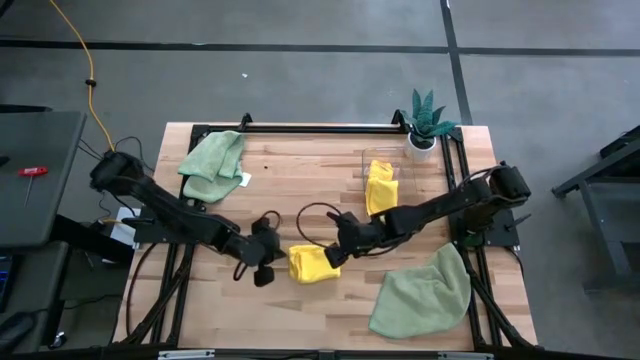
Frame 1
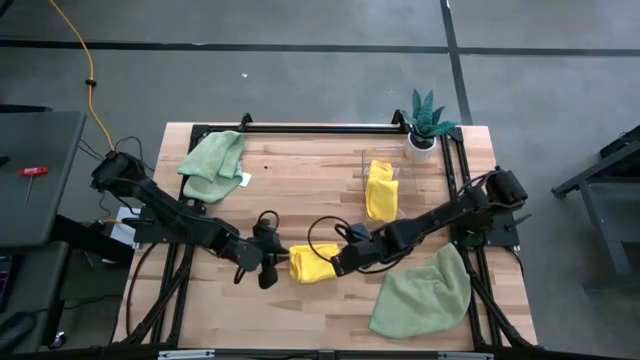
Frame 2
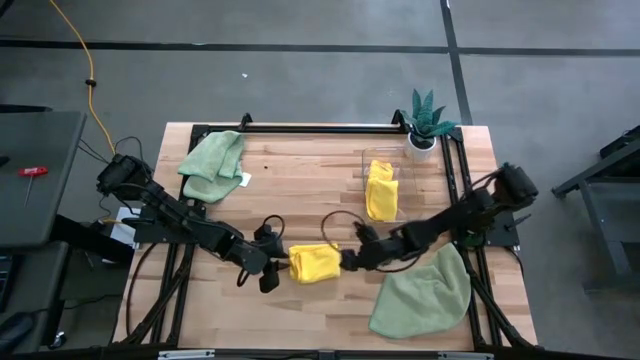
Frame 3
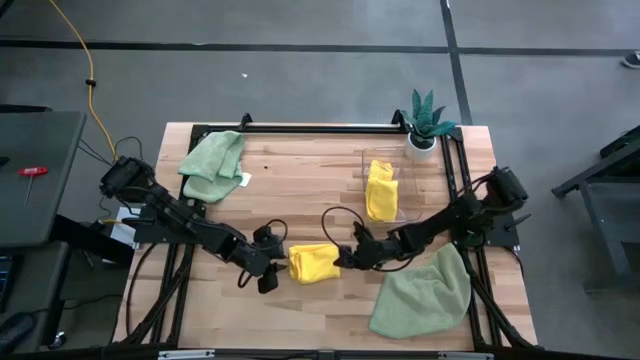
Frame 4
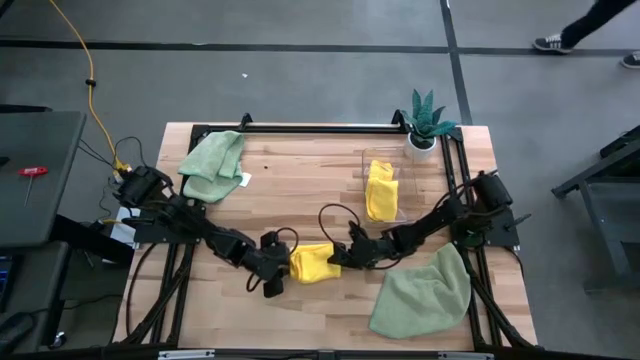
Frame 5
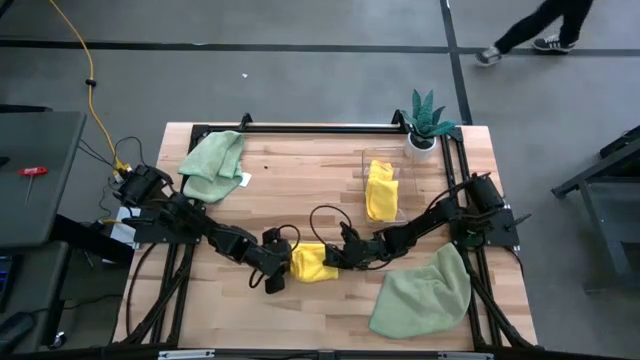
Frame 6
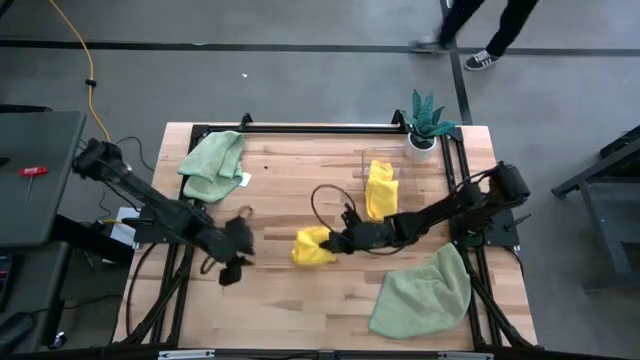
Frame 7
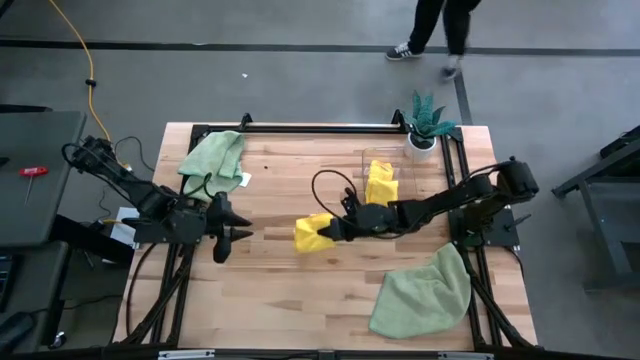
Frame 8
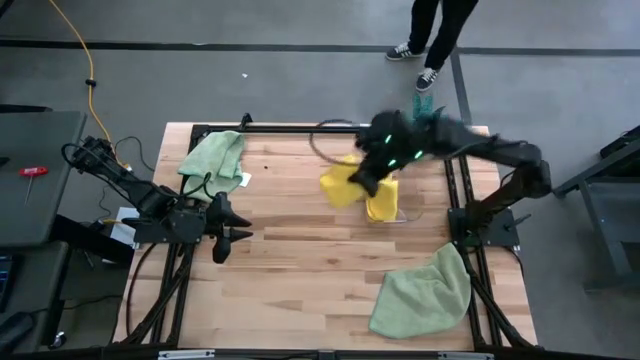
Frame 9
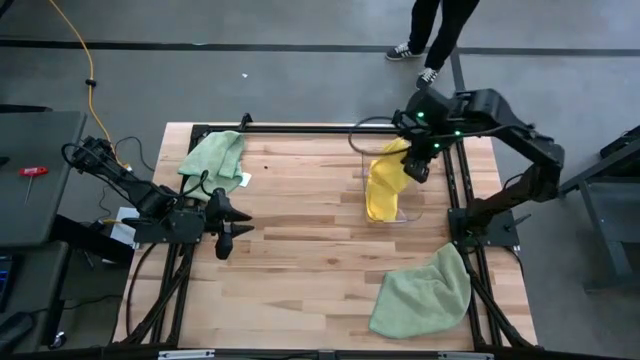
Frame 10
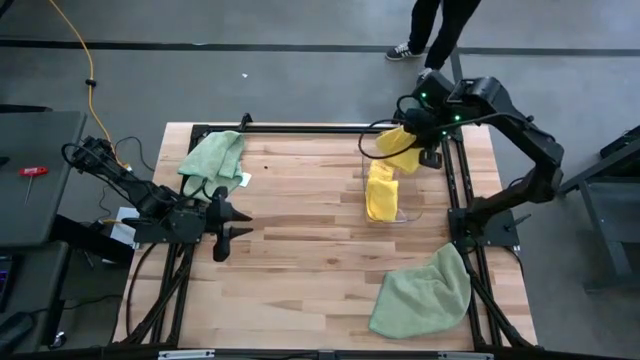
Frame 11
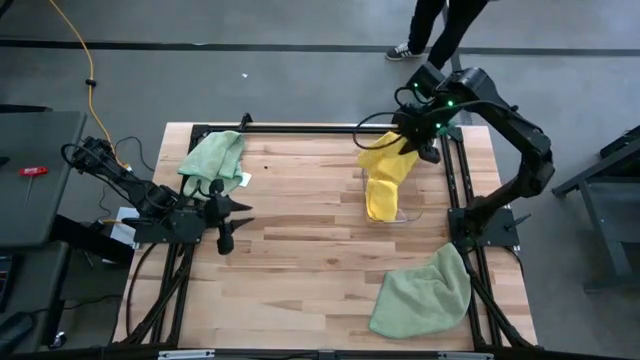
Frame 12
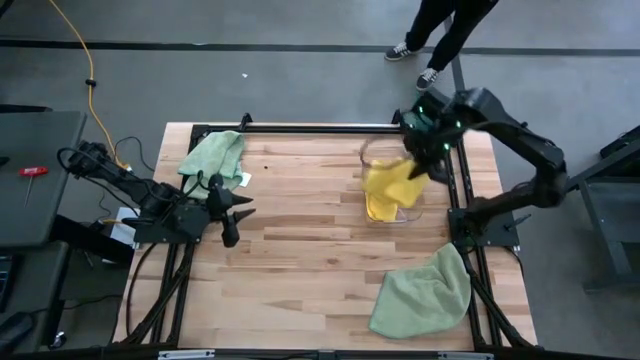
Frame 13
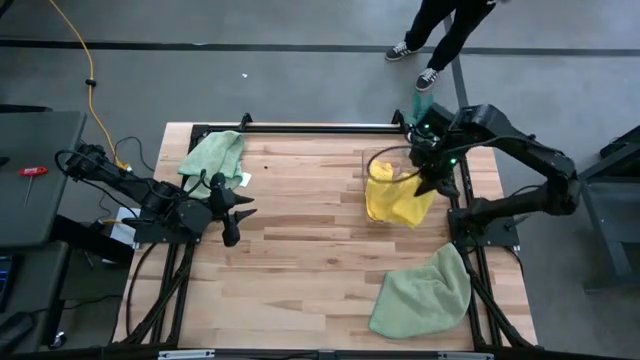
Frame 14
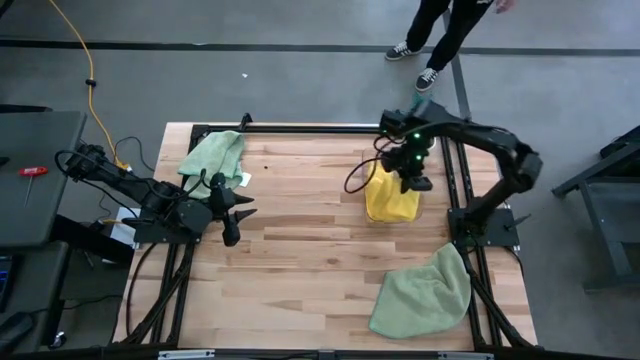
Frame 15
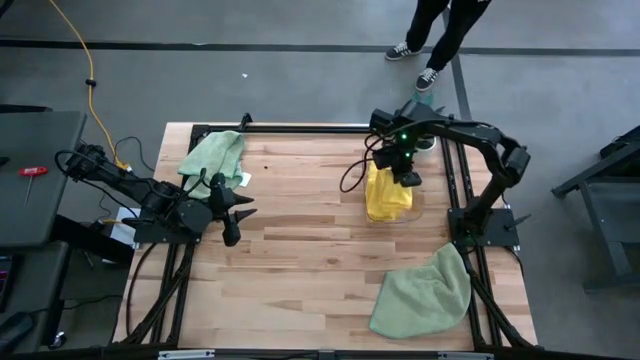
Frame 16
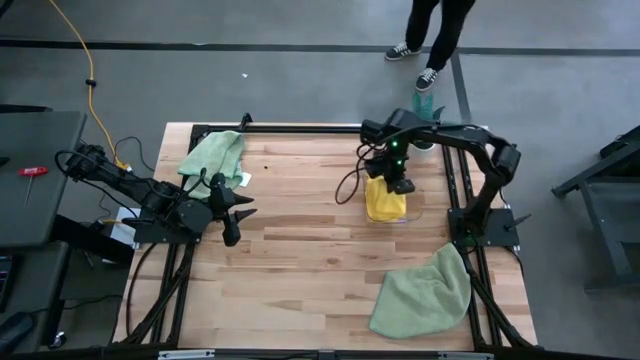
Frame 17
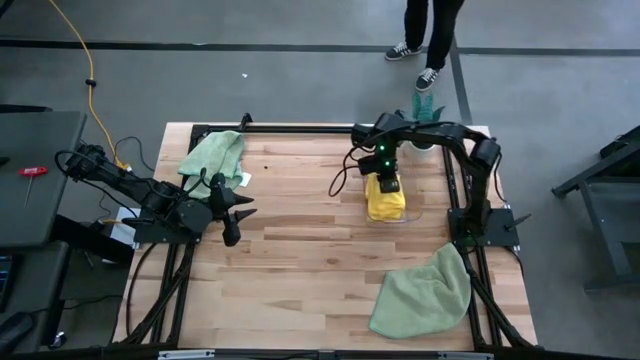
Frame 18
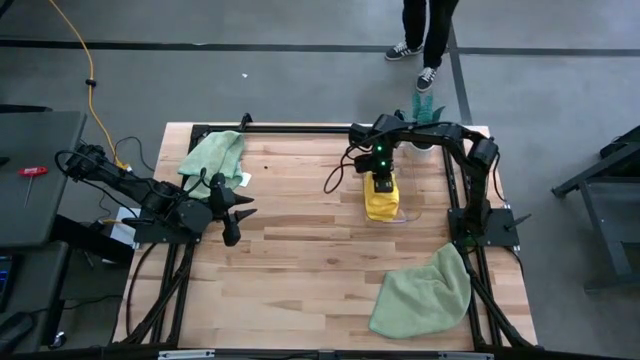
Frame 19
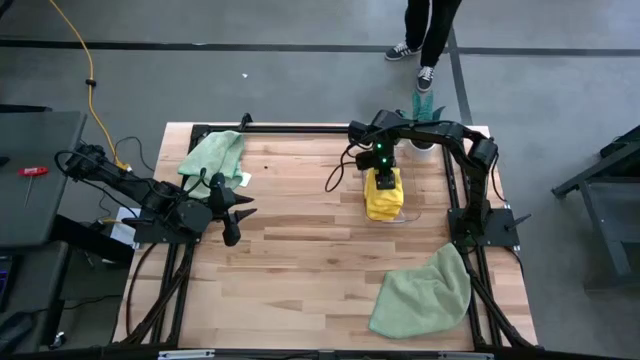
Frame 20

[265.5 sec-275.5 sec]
Task: Fold microfiber towels
Put the folded yellow microfiber towel into the transparent bin

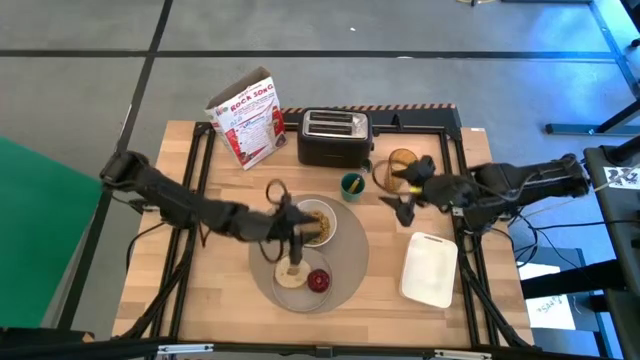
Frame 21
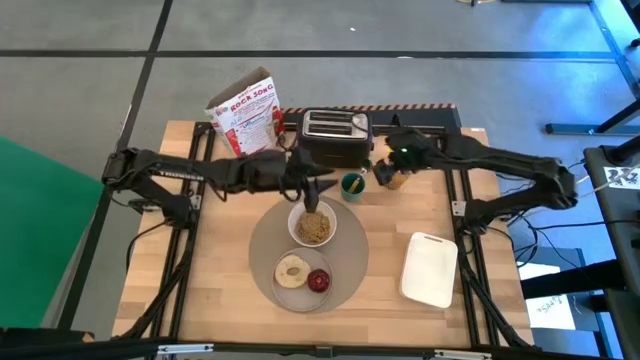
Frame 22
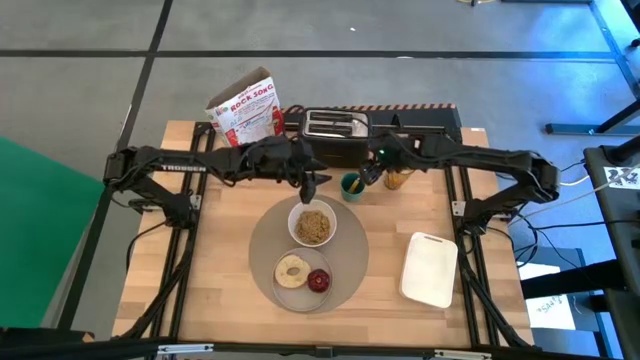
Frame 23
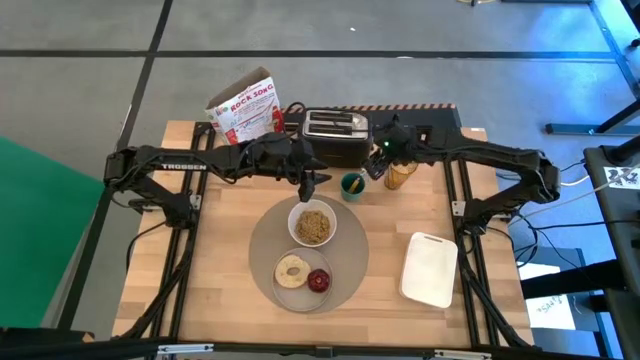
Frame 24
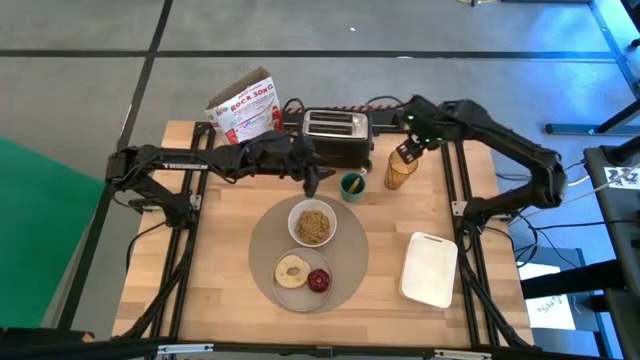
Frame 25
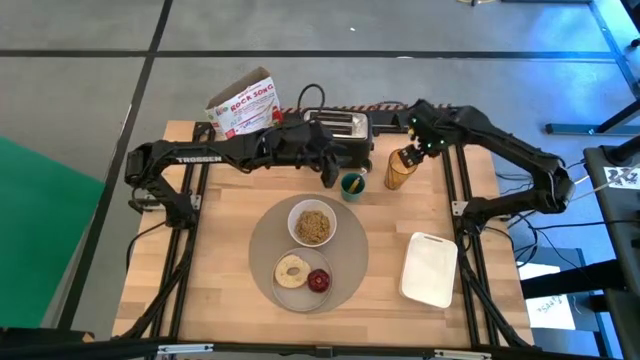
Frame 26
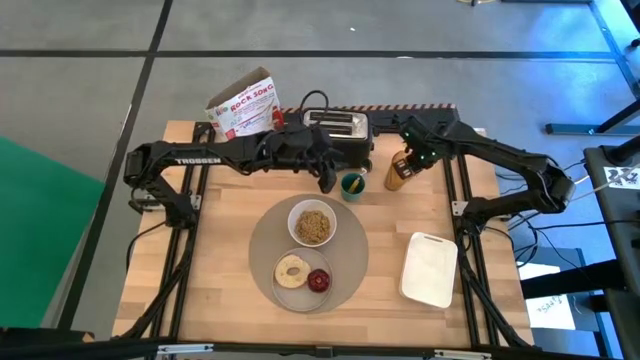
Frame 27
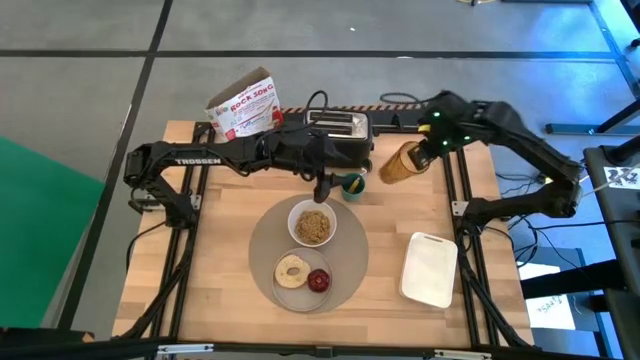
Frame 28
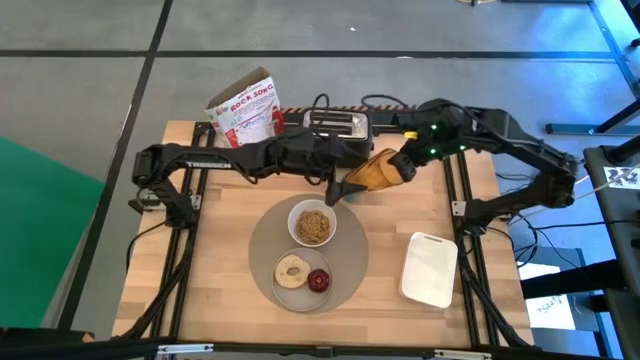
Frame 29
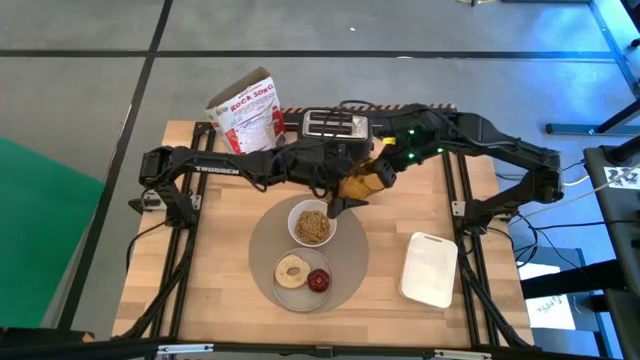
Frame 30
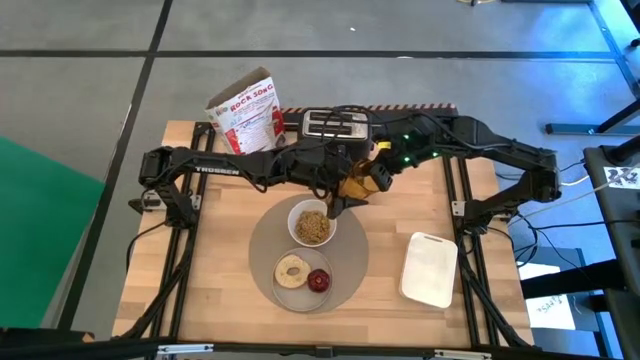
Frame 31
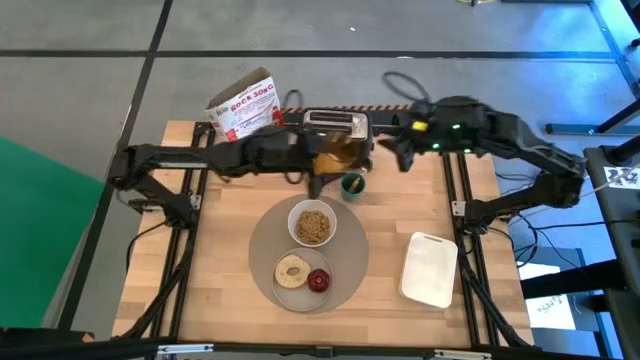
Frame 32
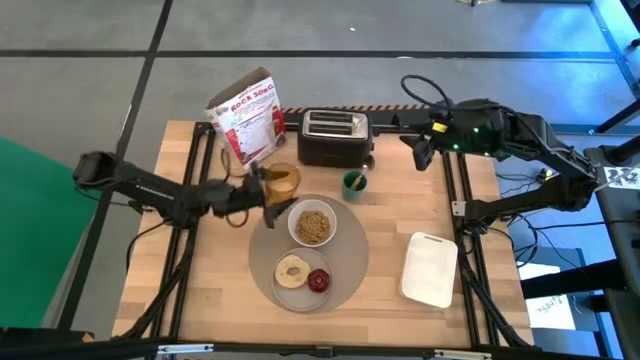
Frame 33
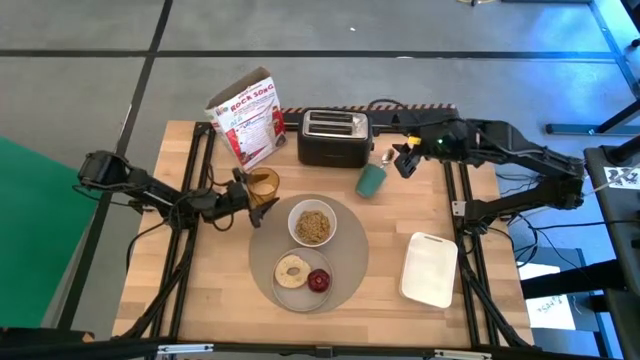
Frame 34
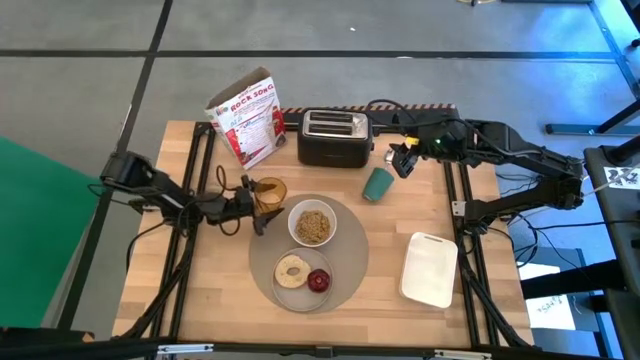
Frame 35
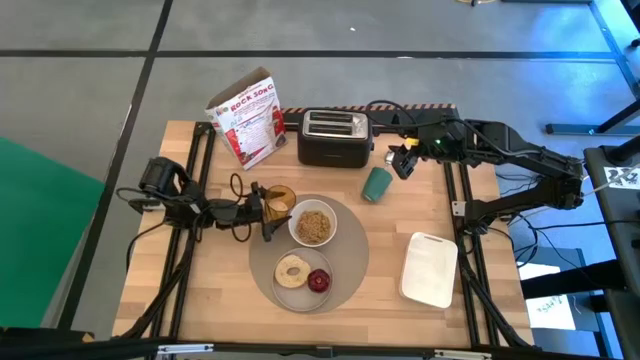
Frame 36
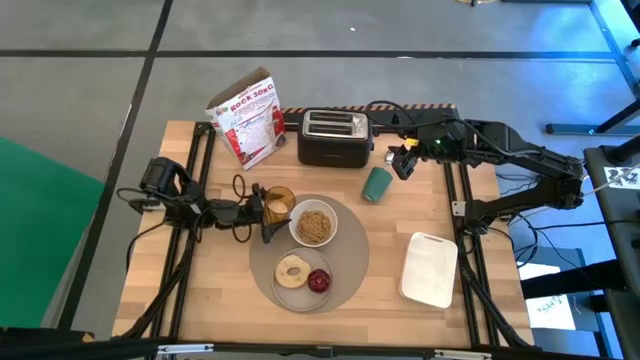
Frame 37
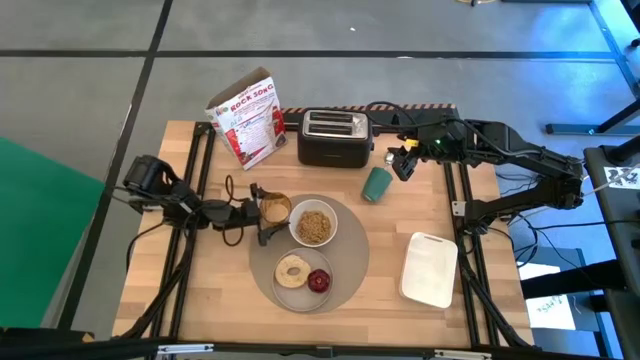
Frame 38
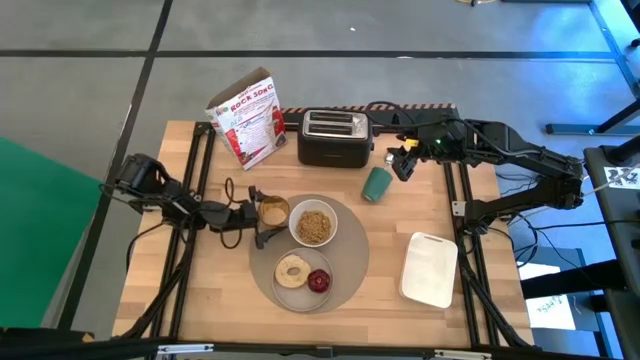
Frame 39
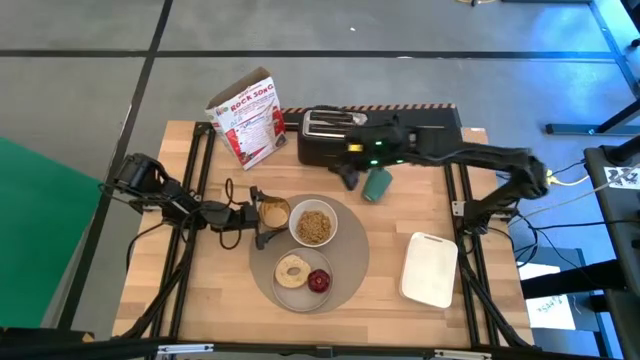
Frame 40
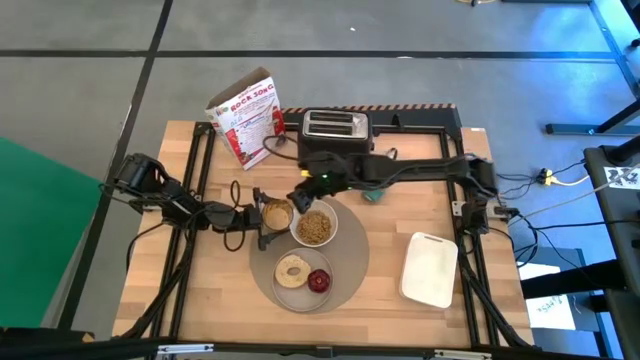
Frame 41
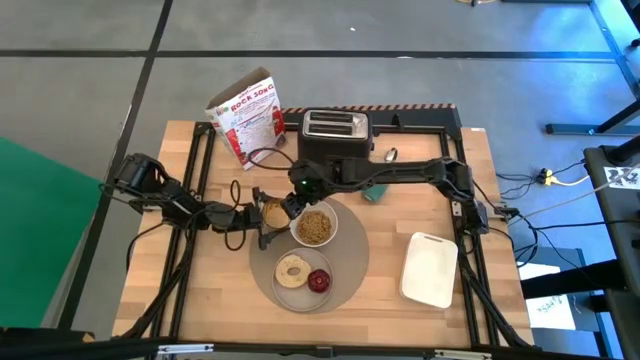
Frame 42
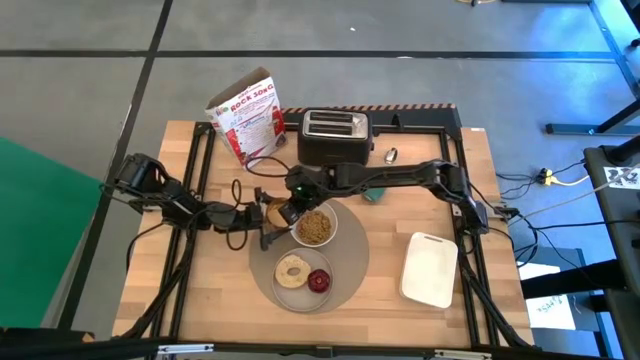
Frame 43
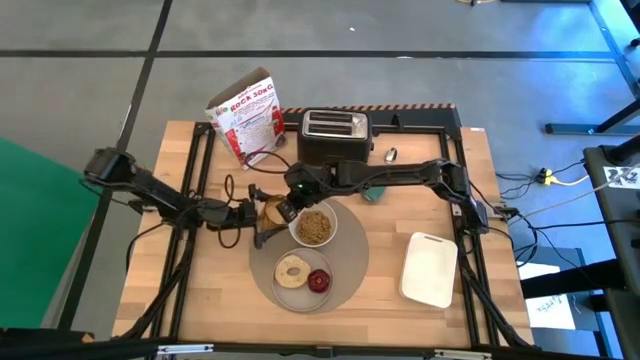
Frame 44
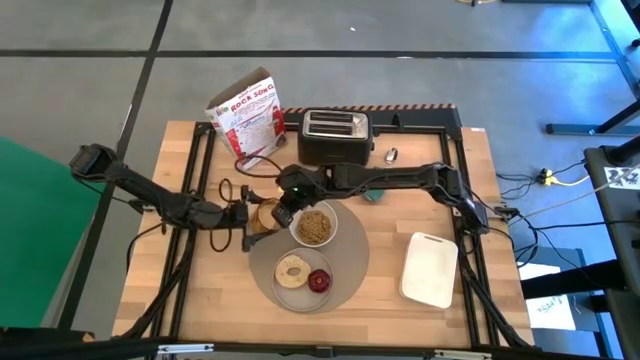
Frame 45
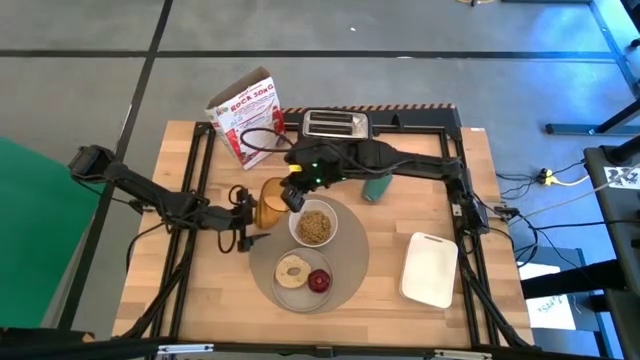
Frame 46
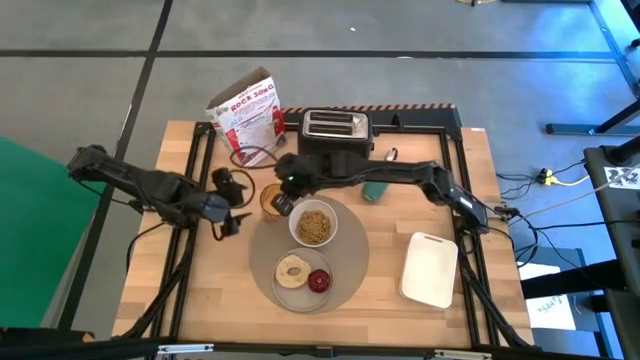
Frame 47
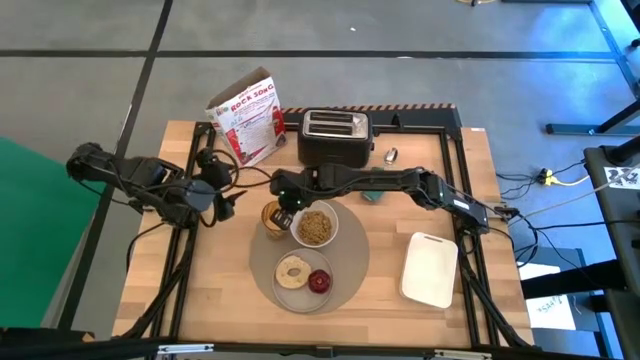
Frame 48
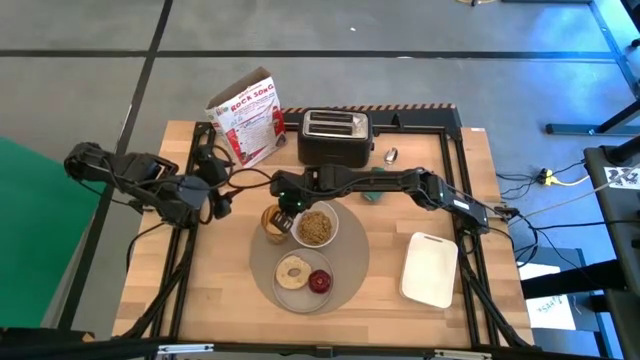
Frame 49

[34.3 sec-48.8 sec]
Task: Arrange a breakfast setting
Put the orange cup of milk to the left of the white bowl
